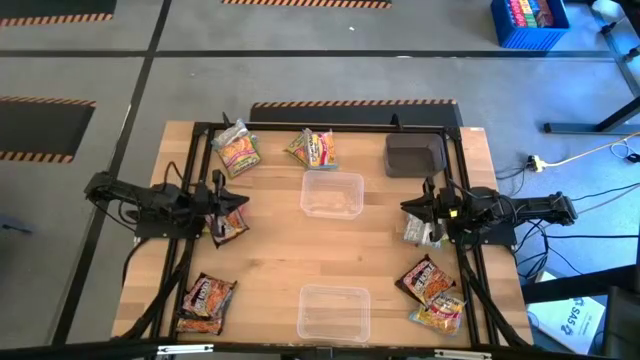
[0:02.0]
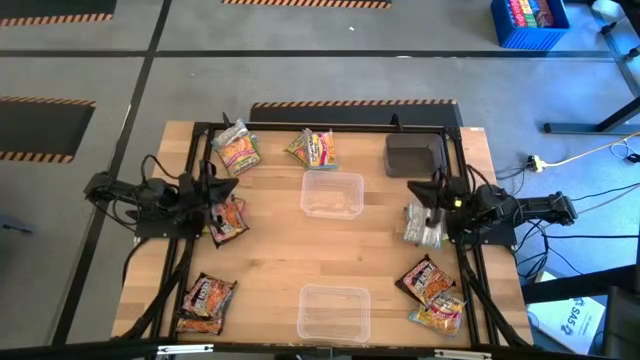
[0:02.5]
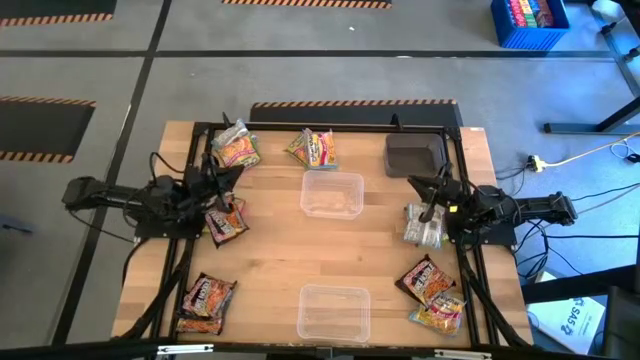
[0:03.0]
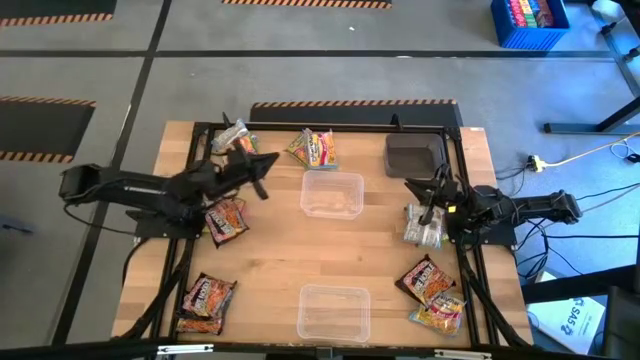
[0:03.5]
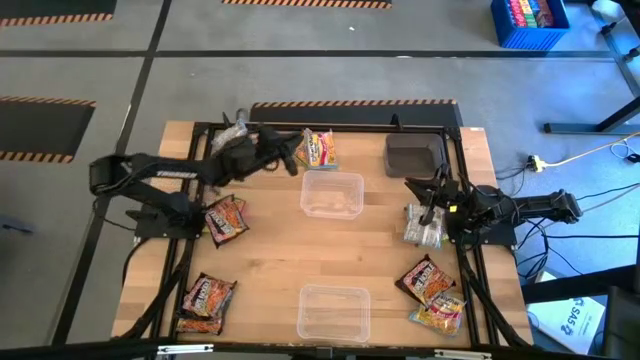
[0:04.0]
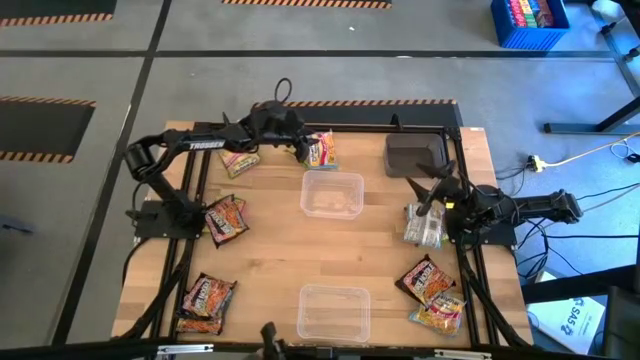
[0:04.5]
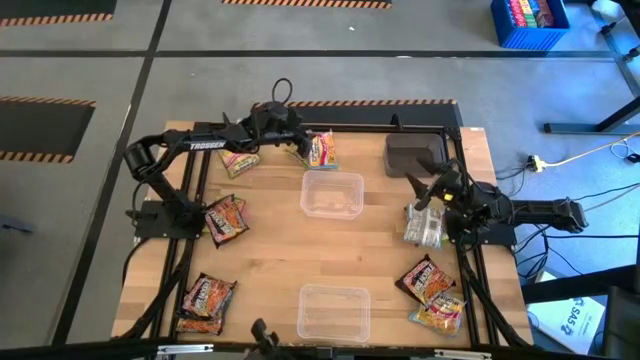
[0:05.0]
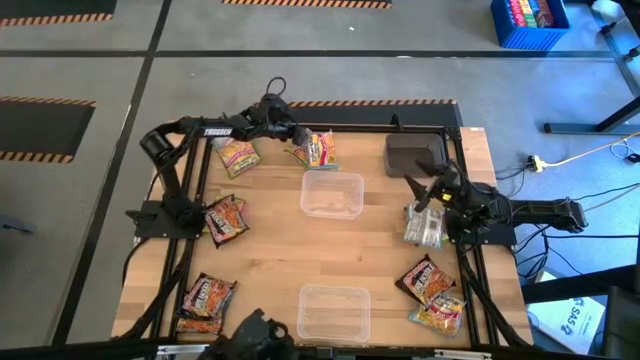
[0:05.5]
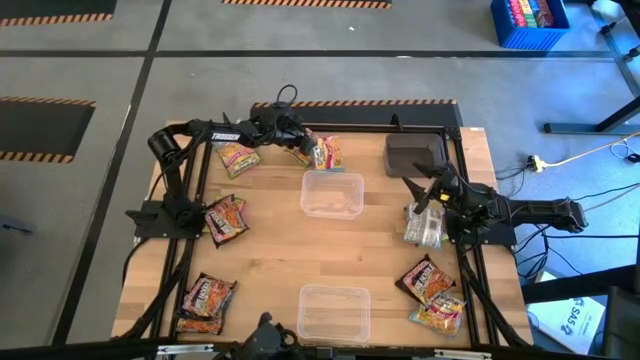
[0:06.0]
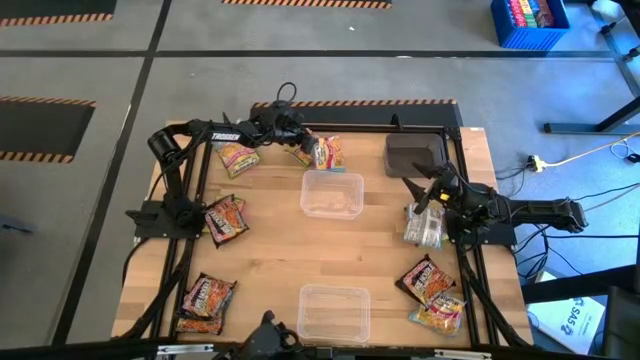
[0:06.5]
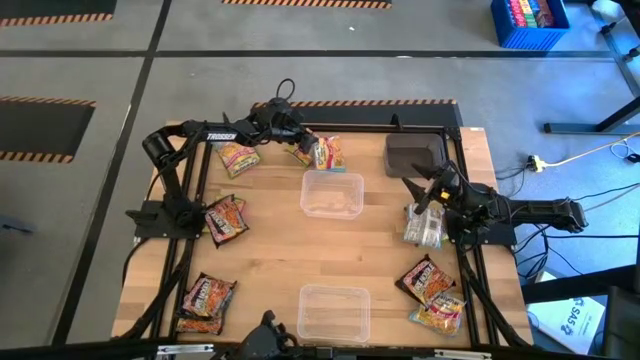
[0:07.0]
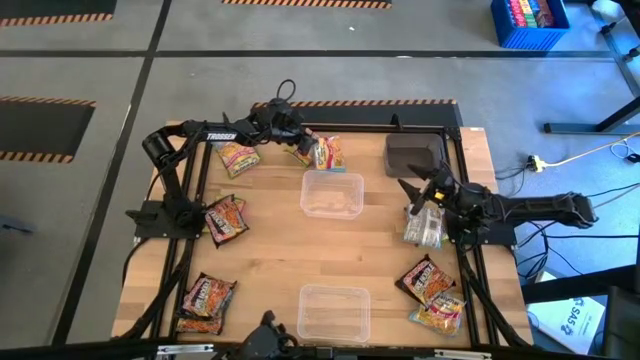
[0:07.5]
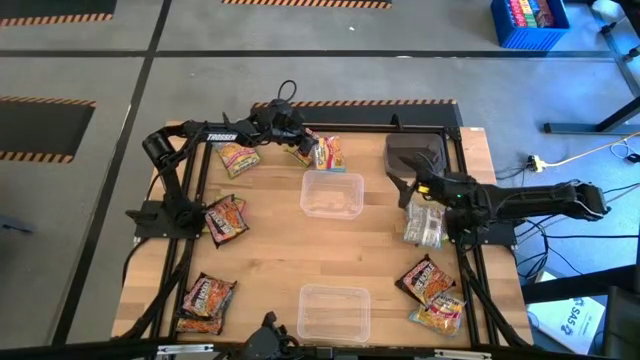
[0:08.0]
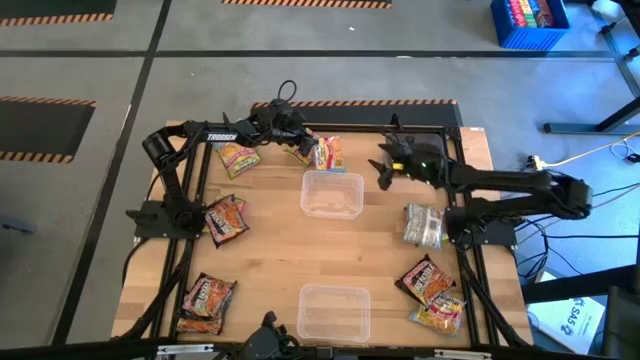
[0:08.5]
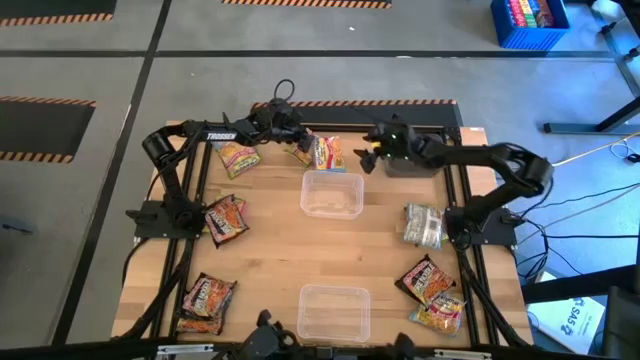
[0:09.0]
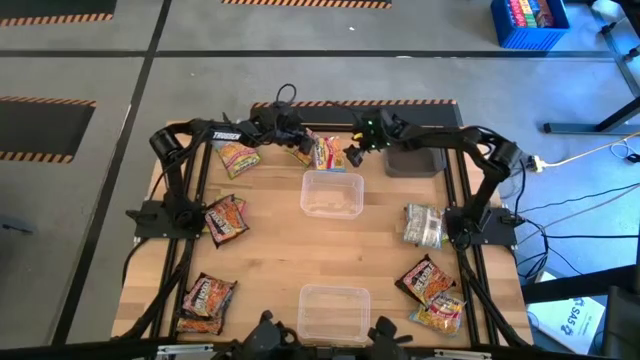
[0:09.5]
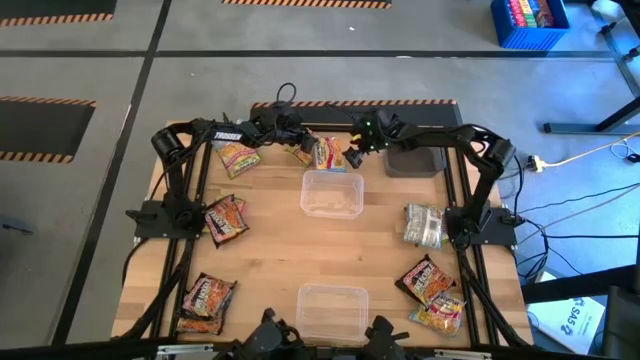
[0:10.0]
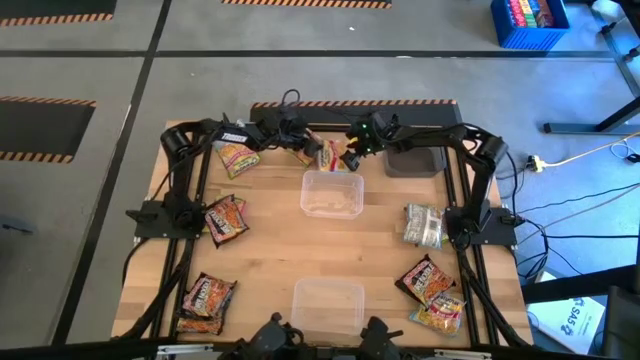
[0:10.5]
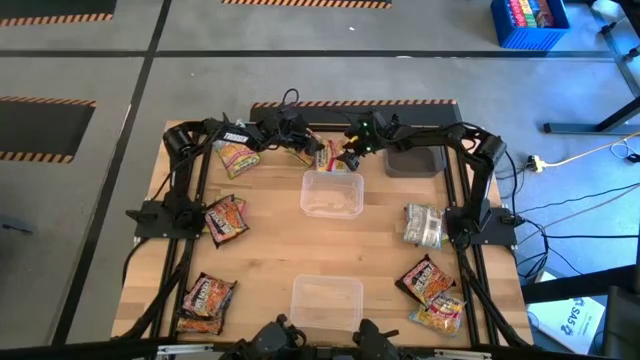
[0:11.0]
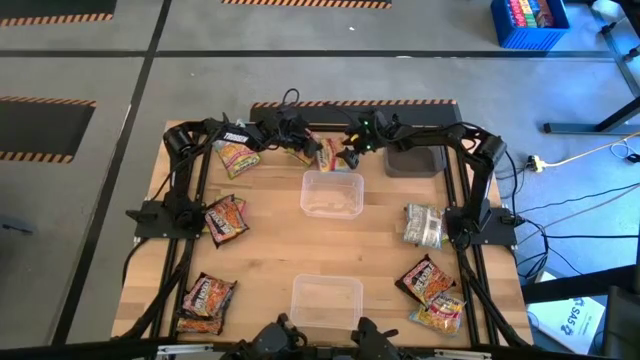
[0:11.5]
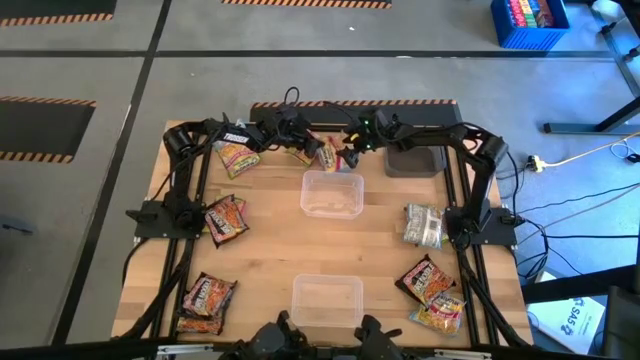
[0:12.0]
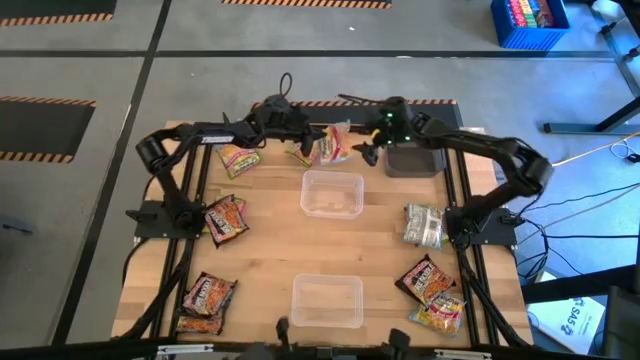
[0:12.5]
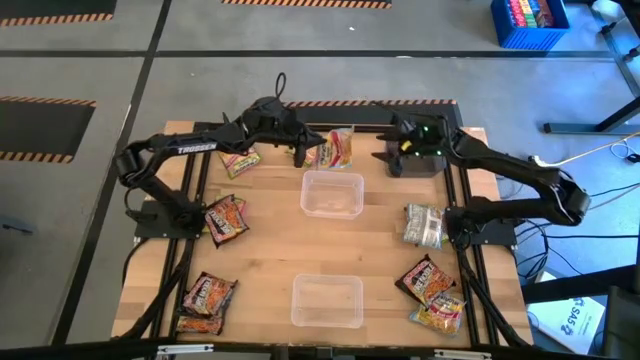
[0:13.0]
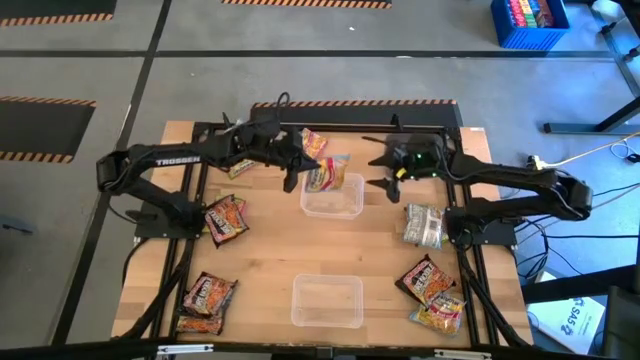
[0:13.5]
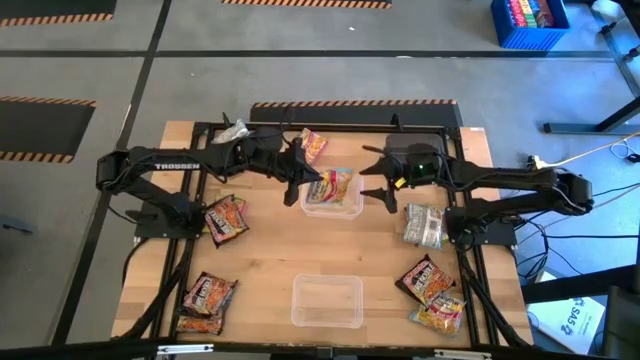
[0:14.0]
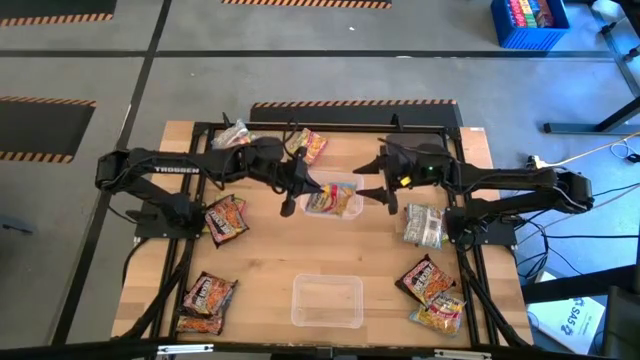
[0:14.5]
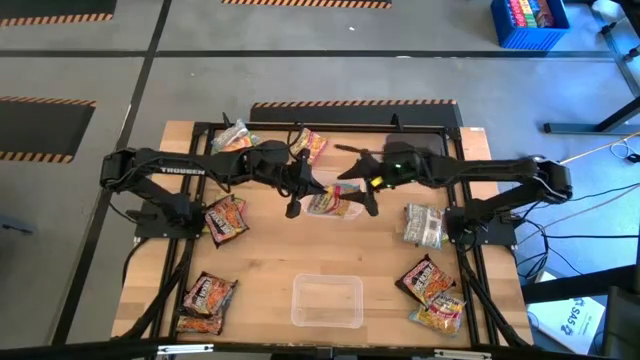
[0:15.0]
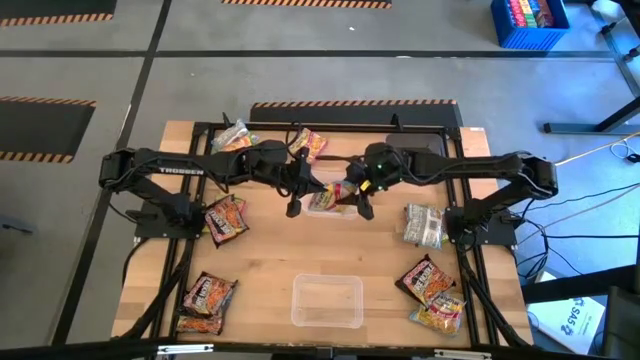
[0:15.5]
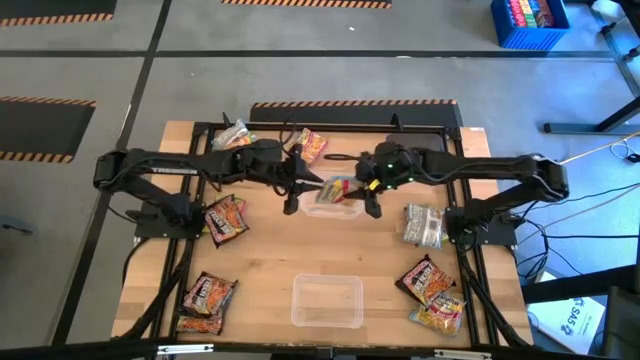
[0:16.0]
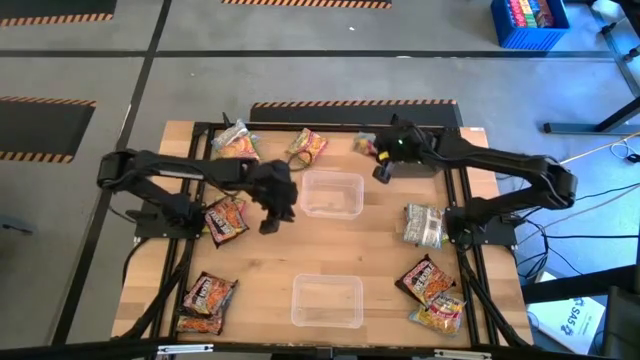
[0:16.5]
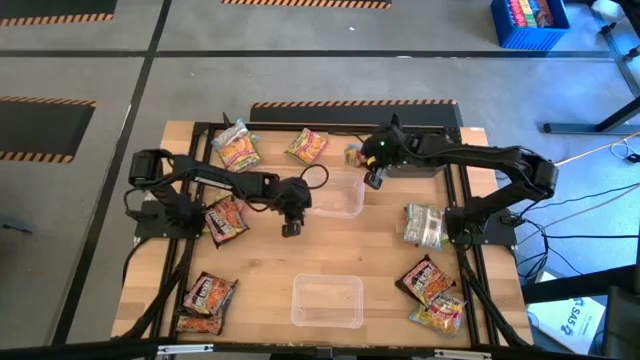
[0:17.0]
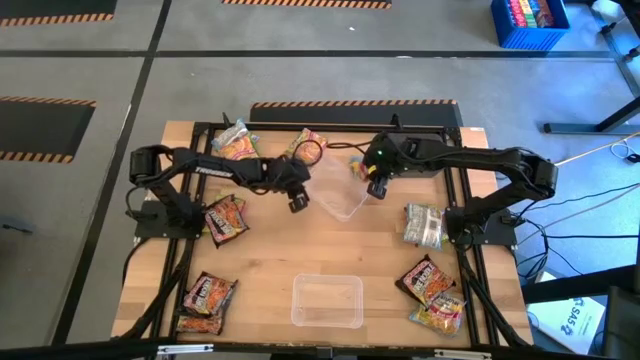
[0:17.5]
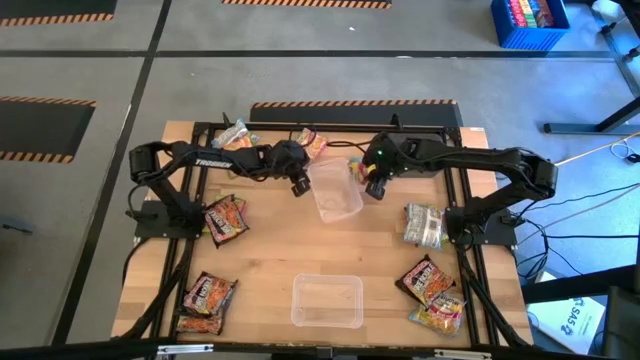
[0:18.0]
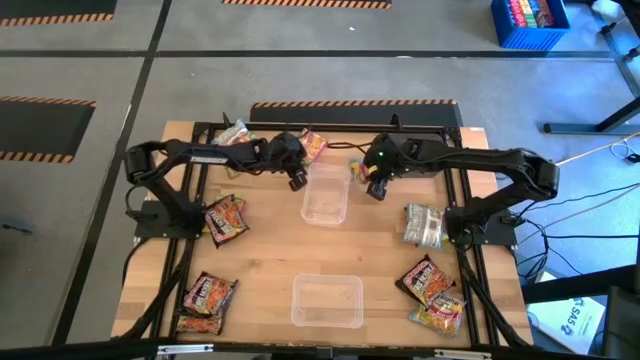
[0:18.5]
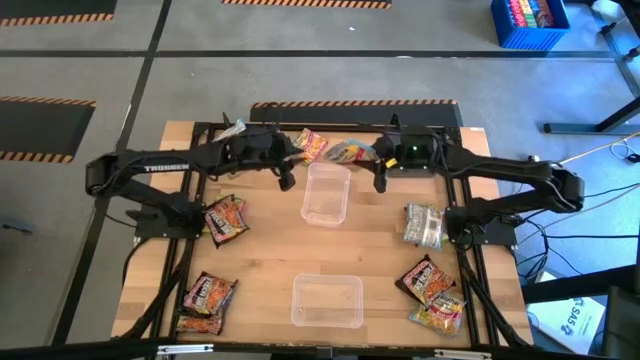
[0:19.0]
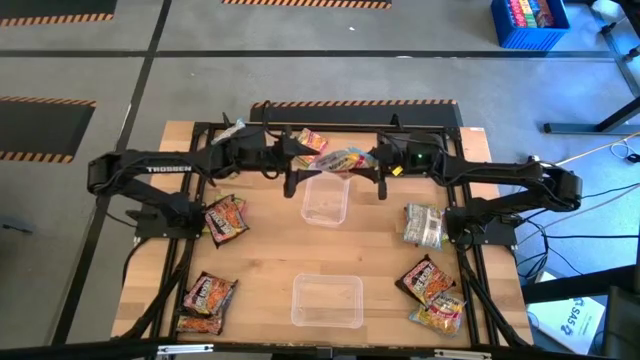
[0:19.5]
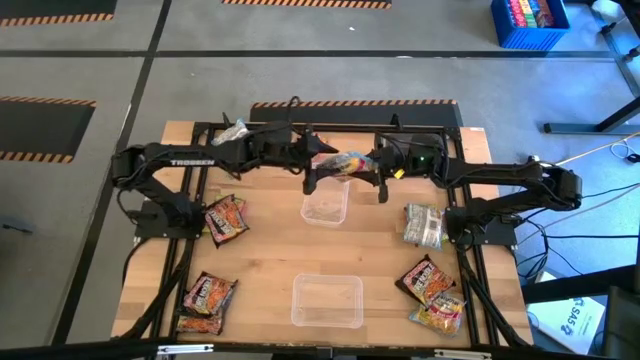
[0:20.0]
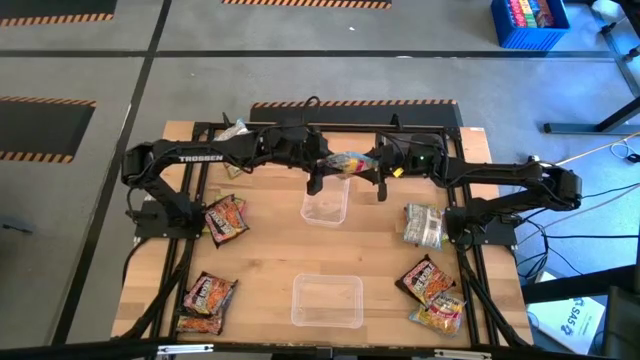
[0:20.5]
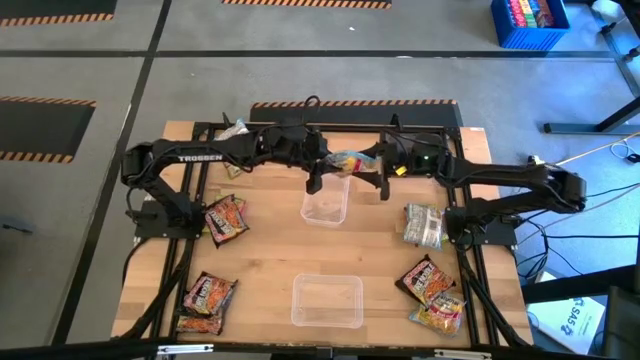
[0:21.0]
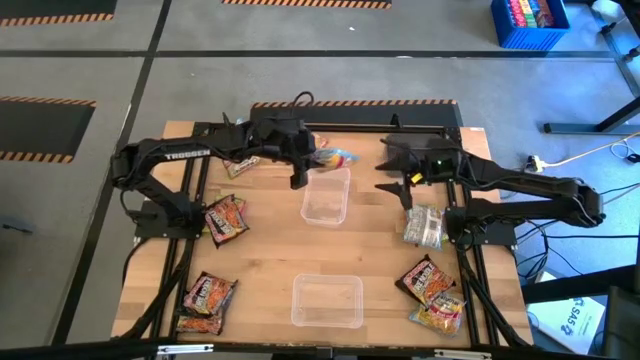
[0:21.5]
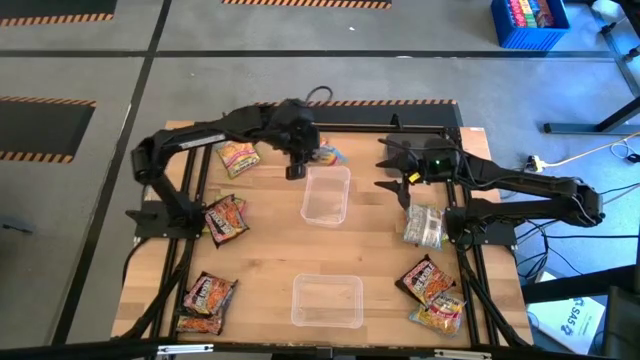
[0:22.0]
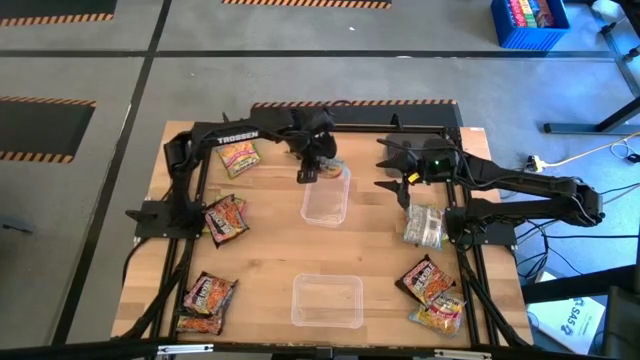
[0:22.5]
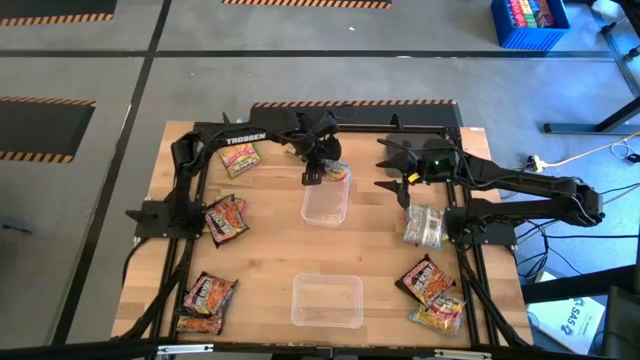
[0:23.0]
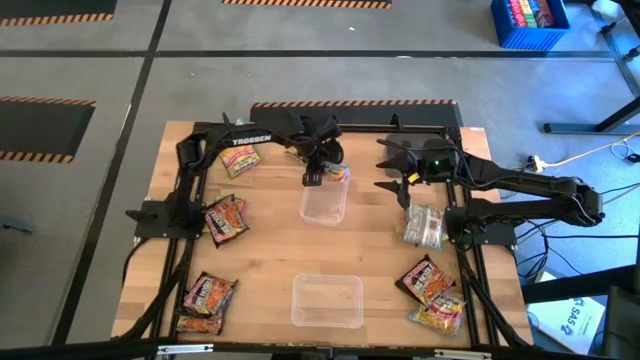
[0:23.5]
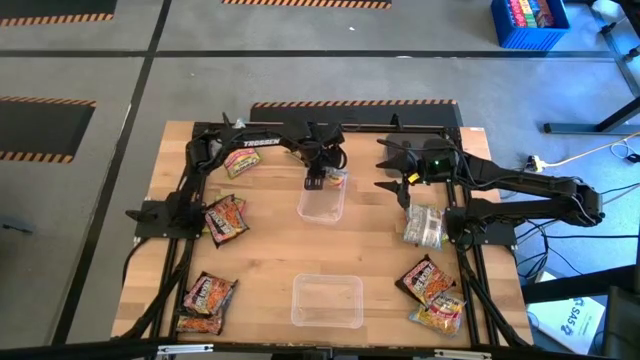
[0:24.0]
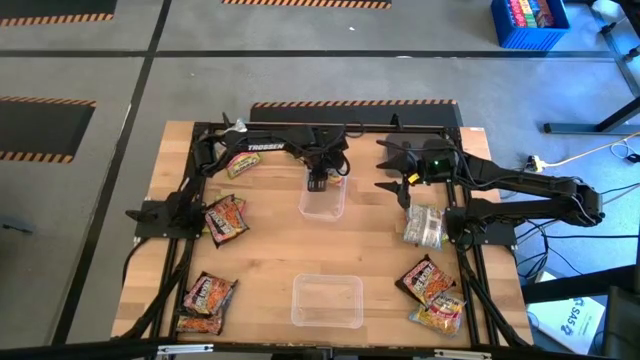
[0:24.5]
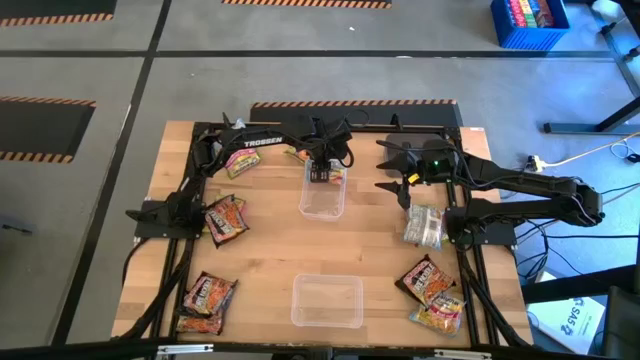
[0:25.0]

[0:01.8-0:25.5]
Task: Sort Maruchan noodles
Put the blue noodle pack into the top transparent bin
